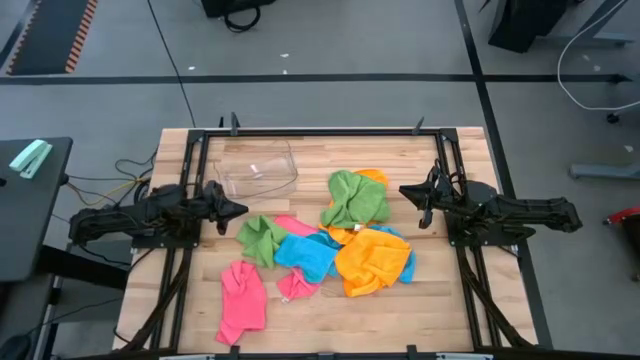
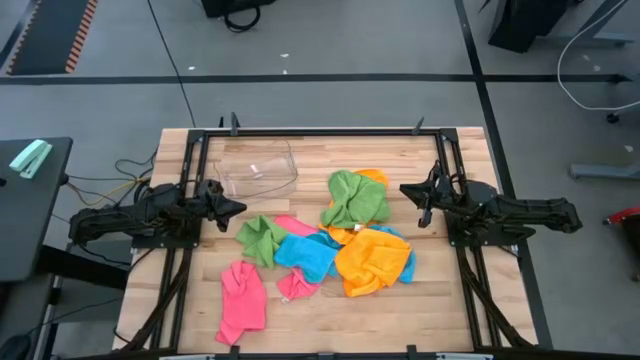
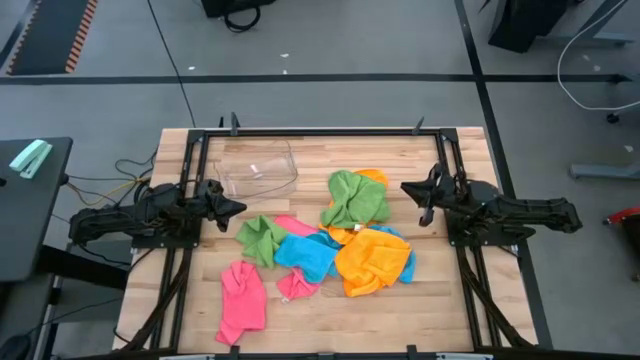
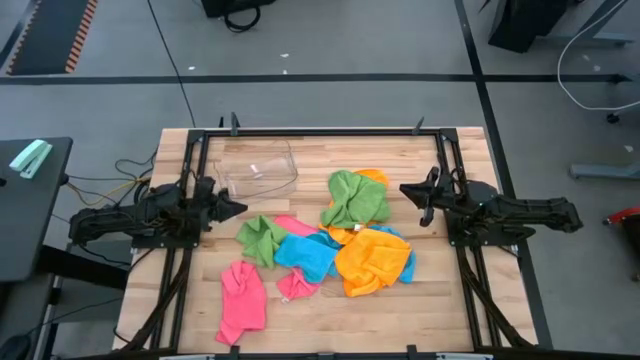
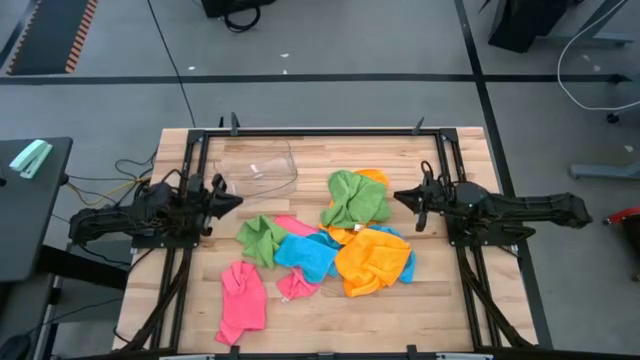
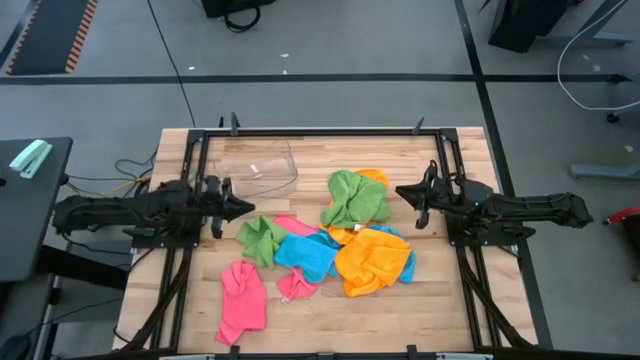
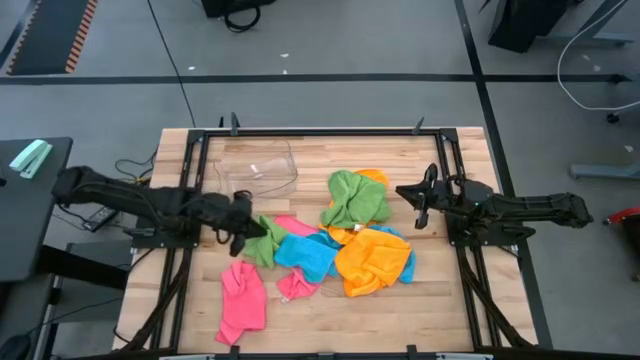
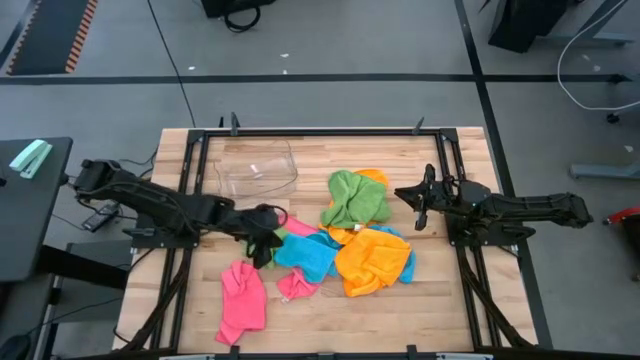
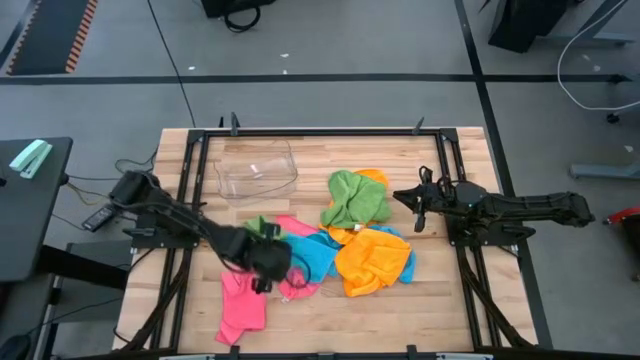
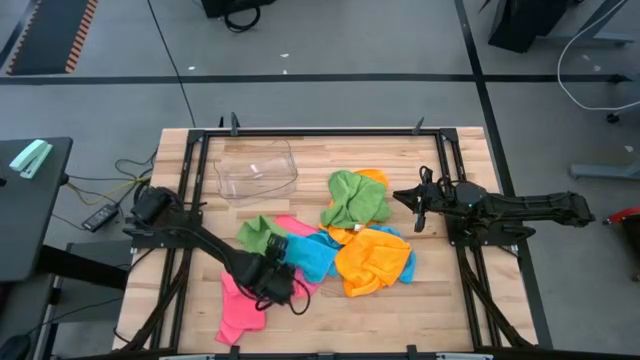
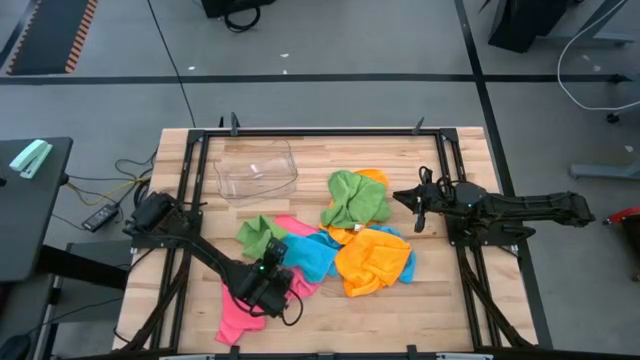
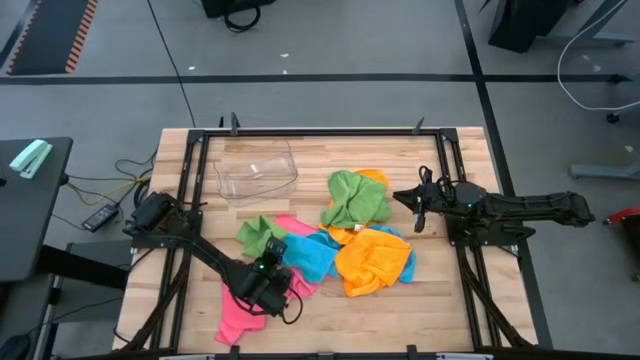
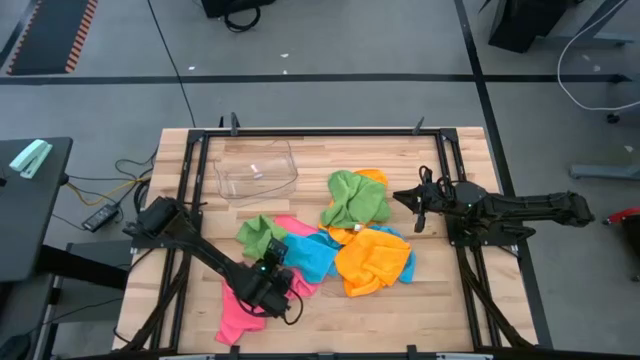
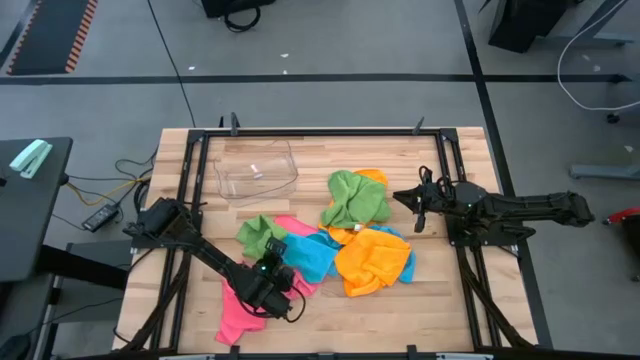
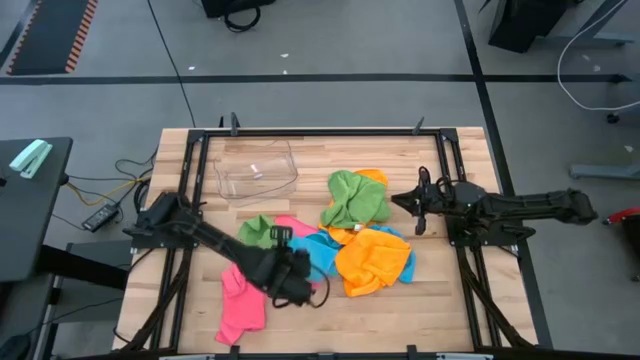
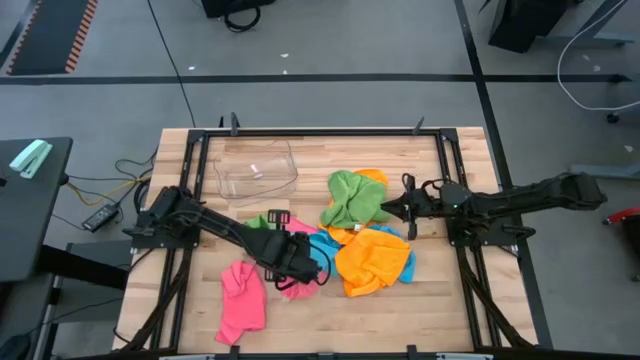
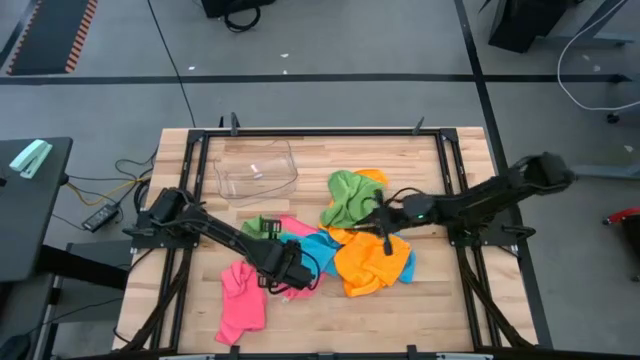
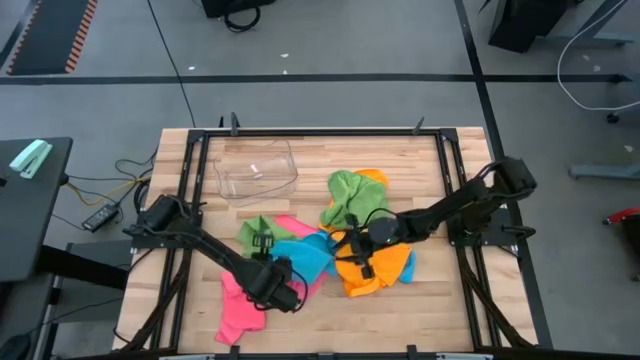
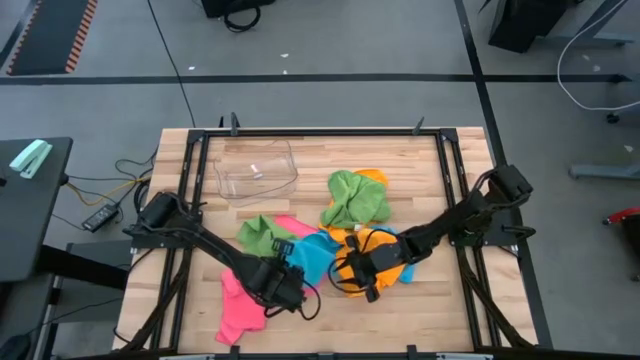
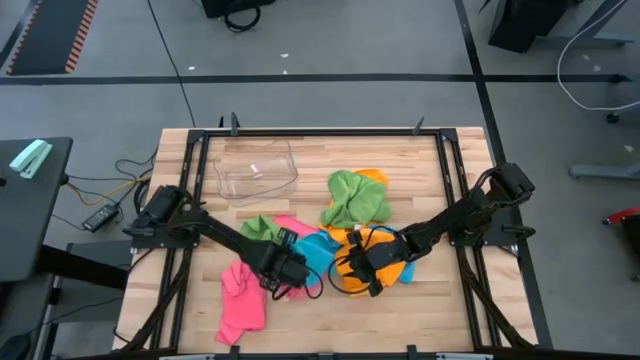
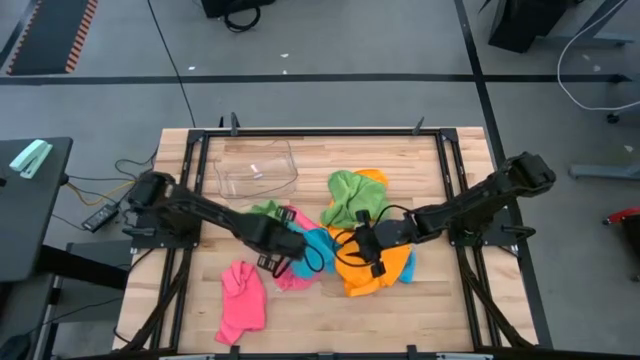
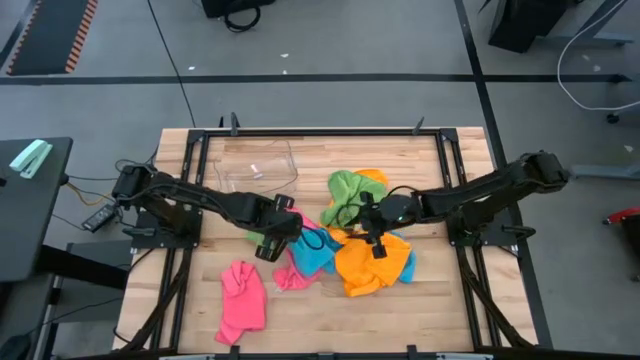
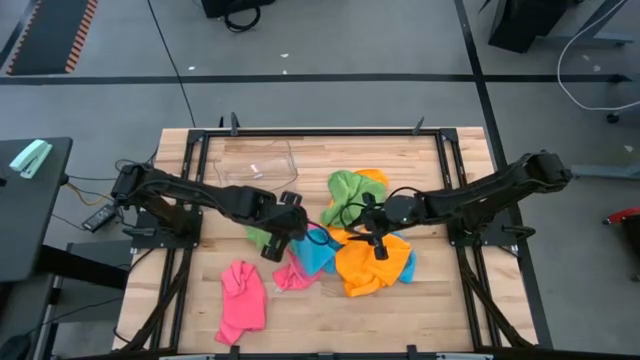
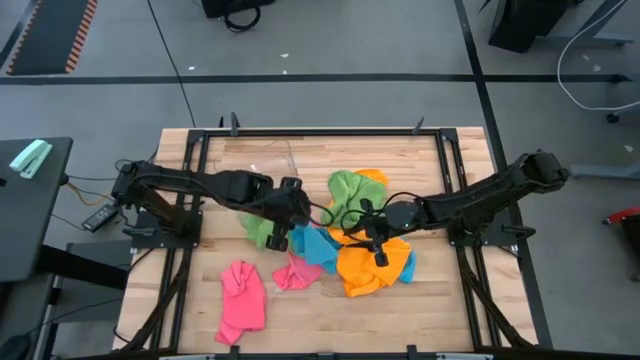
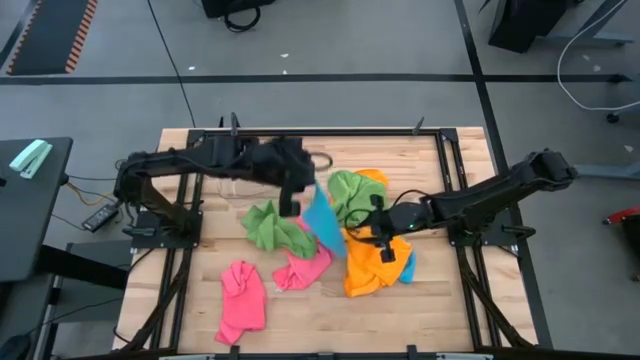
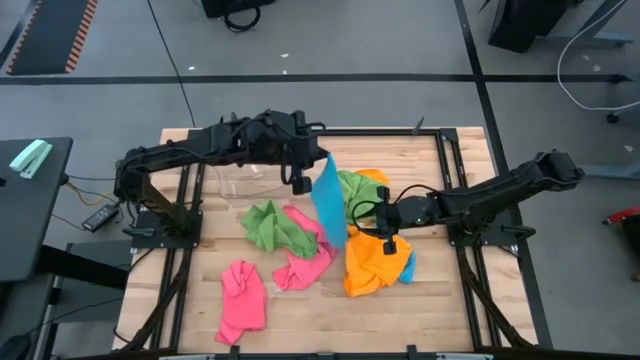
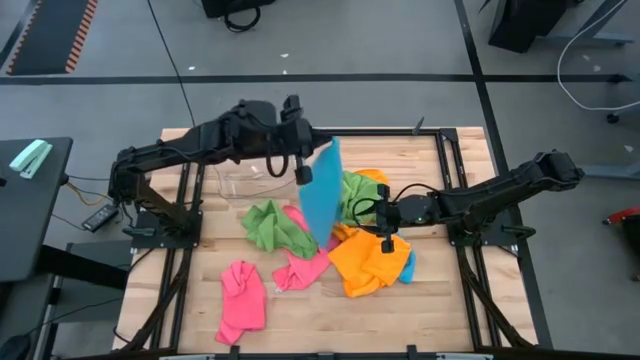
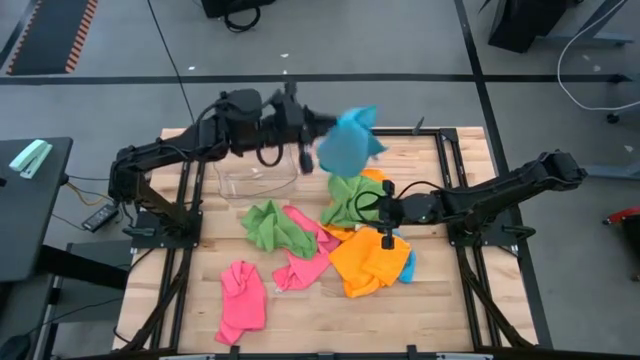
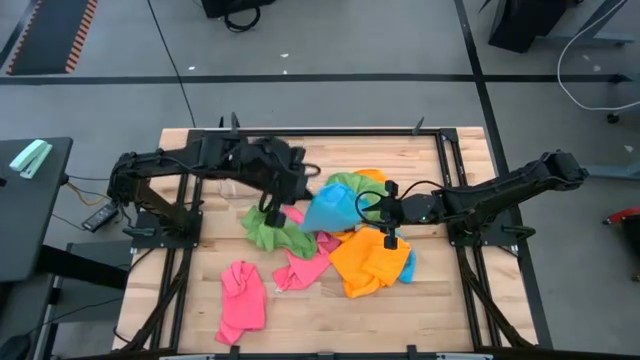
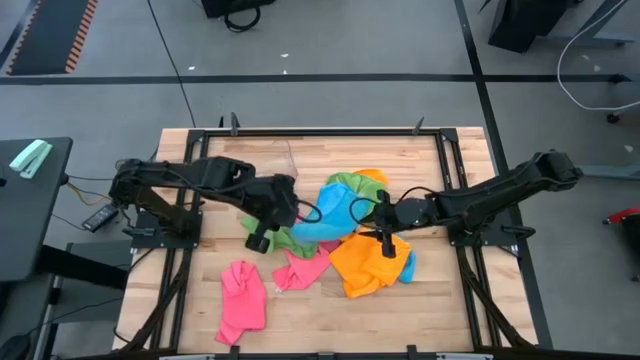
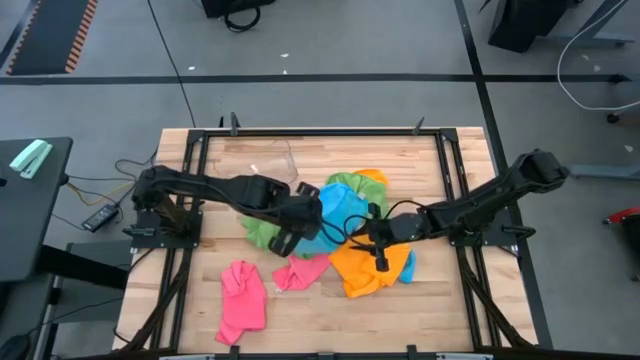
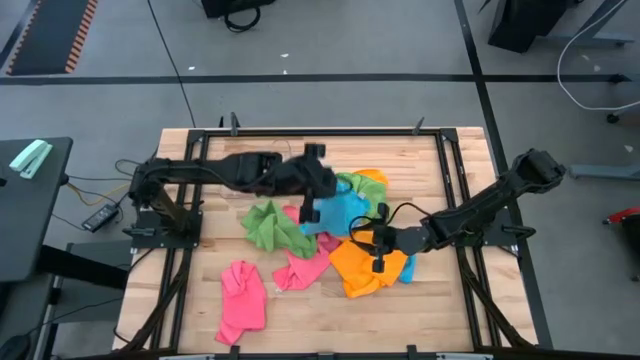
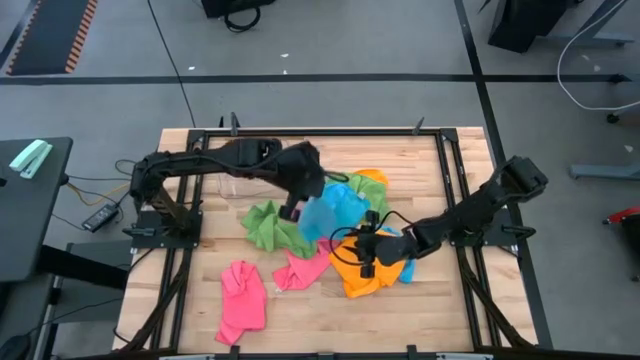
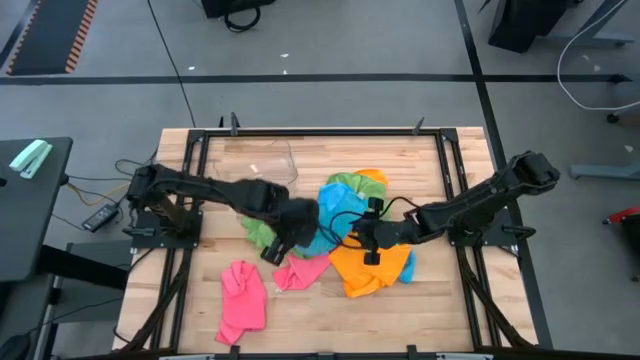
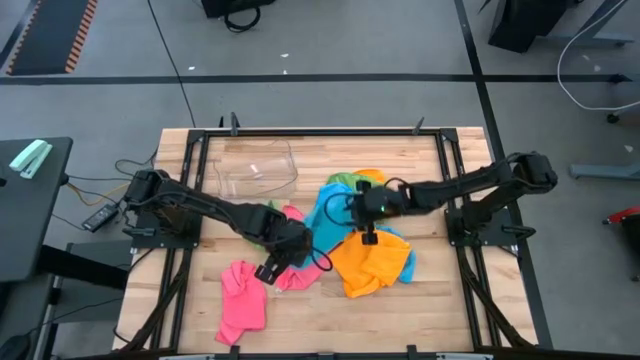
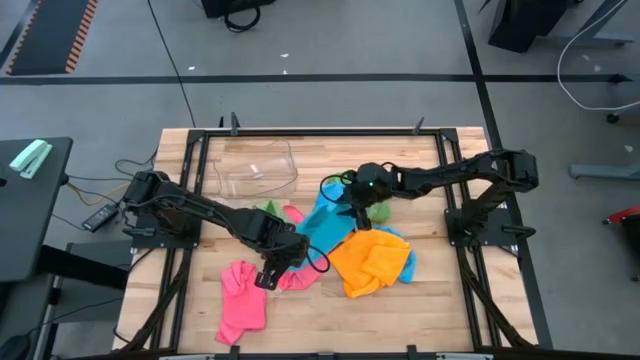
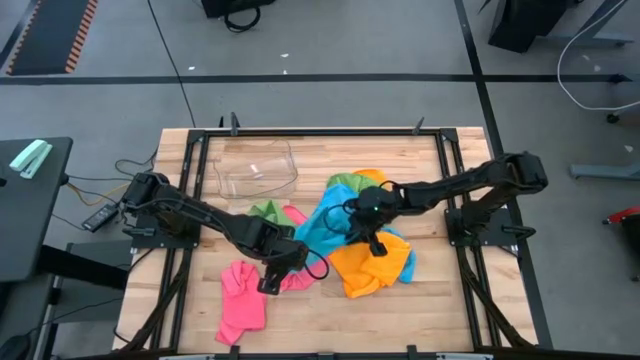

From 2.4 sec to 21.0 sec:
Task: Fold microfiber towels
Fold the left blue microfiber towel
